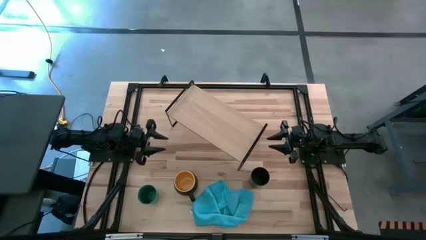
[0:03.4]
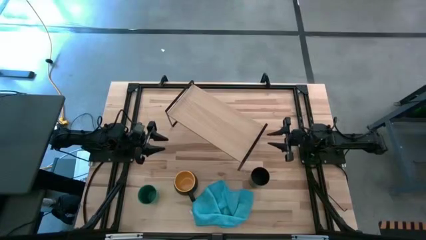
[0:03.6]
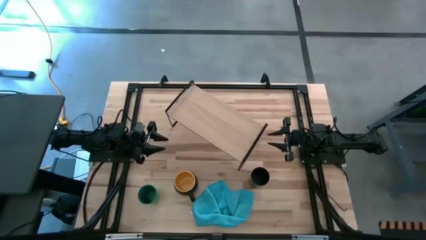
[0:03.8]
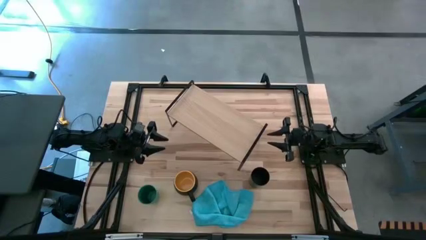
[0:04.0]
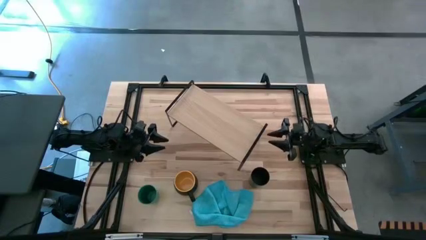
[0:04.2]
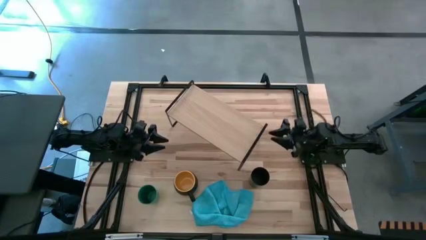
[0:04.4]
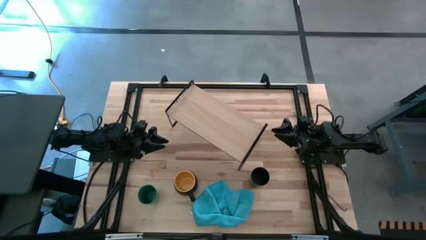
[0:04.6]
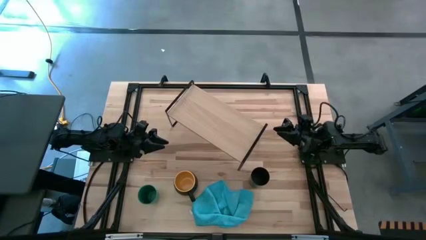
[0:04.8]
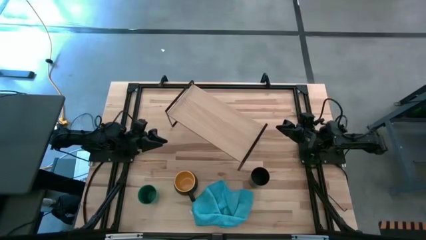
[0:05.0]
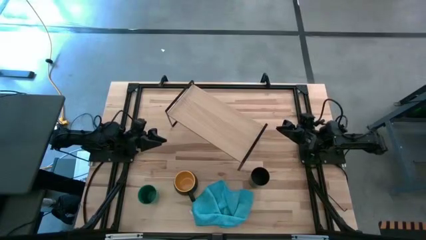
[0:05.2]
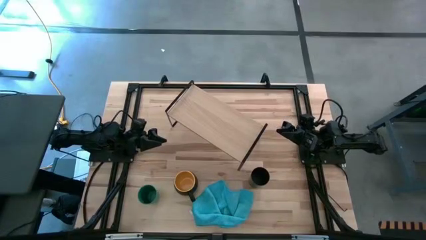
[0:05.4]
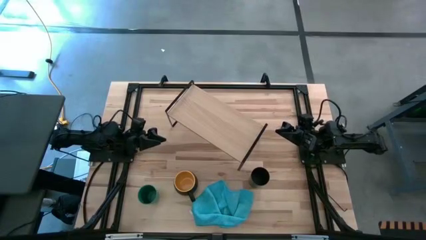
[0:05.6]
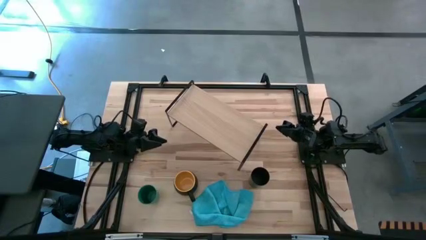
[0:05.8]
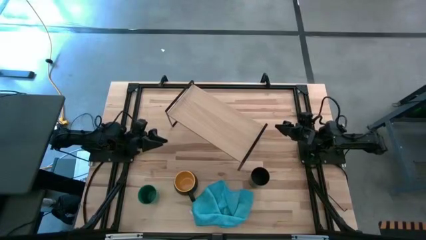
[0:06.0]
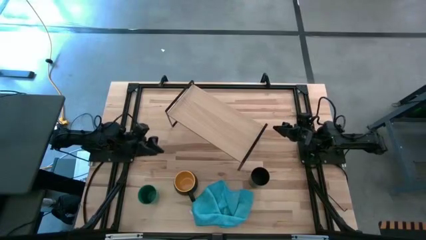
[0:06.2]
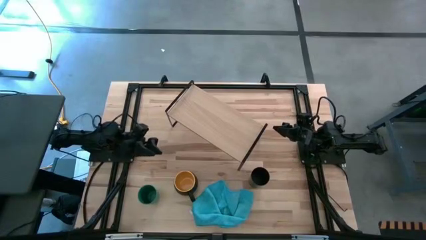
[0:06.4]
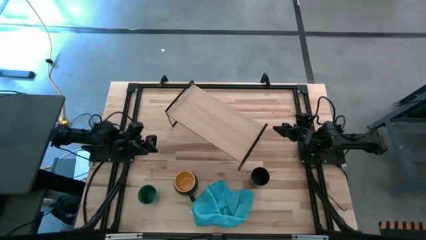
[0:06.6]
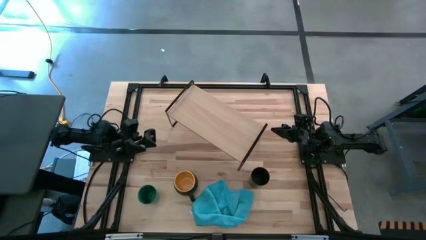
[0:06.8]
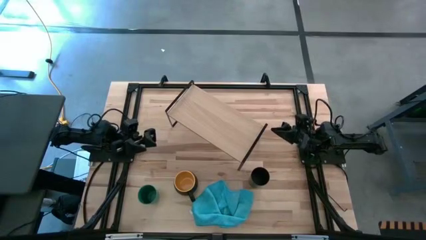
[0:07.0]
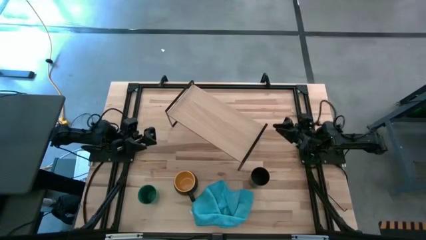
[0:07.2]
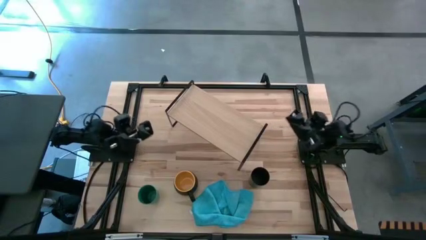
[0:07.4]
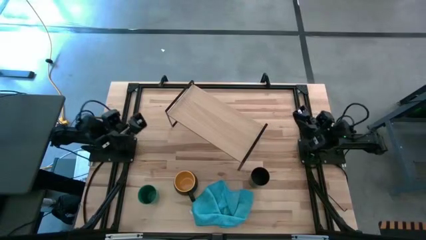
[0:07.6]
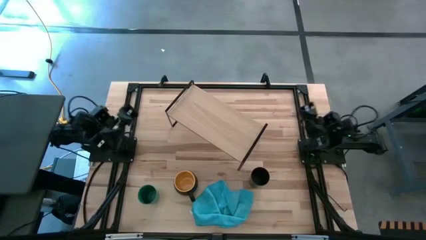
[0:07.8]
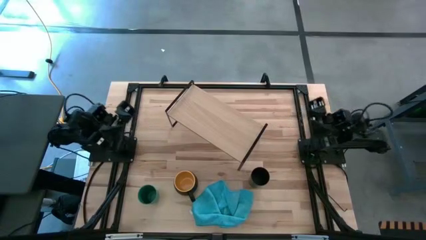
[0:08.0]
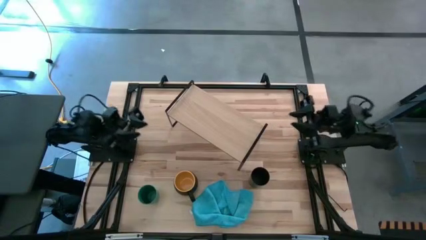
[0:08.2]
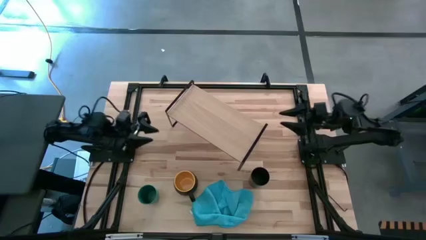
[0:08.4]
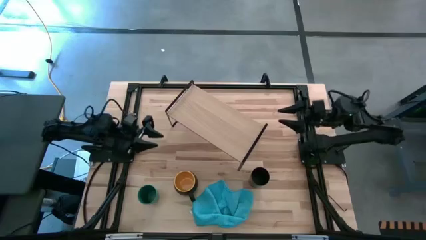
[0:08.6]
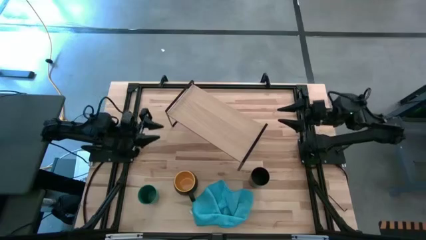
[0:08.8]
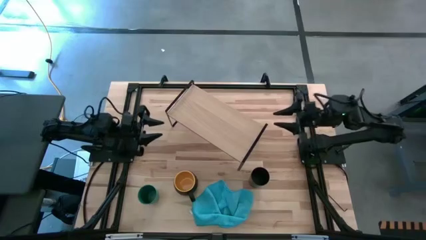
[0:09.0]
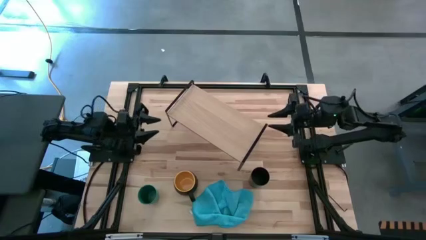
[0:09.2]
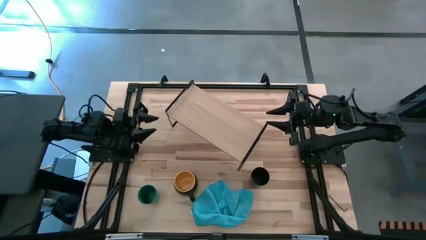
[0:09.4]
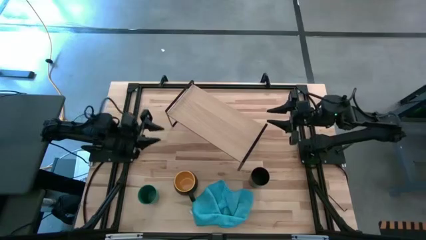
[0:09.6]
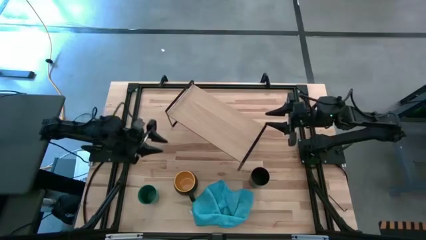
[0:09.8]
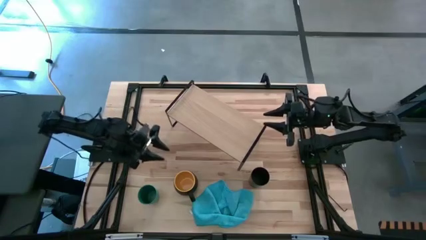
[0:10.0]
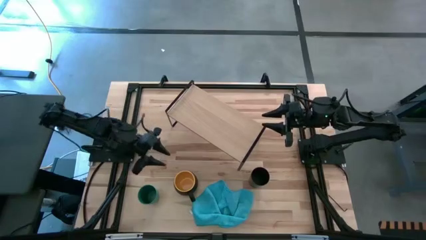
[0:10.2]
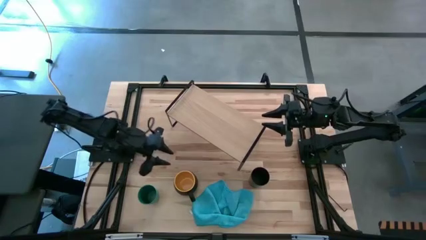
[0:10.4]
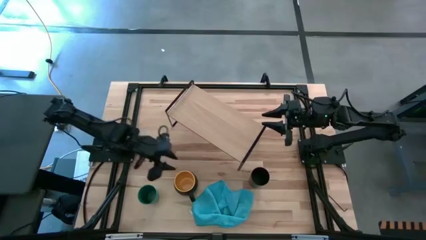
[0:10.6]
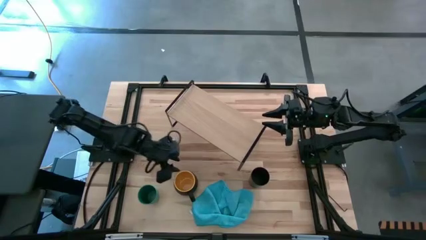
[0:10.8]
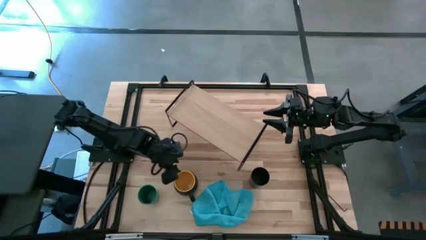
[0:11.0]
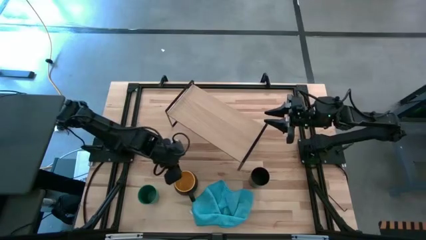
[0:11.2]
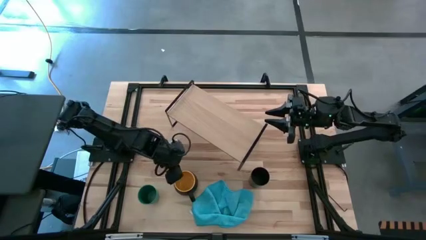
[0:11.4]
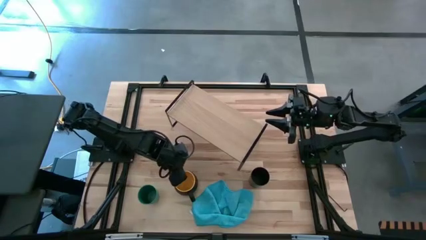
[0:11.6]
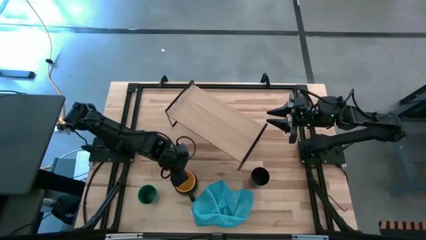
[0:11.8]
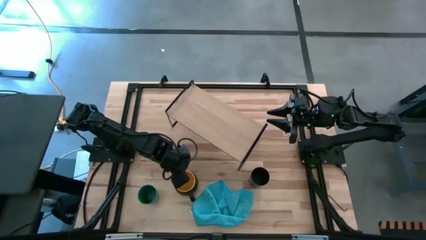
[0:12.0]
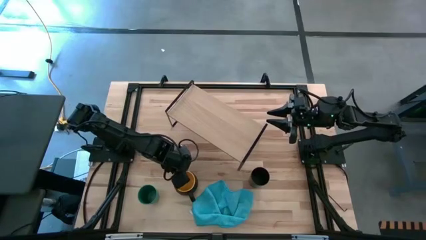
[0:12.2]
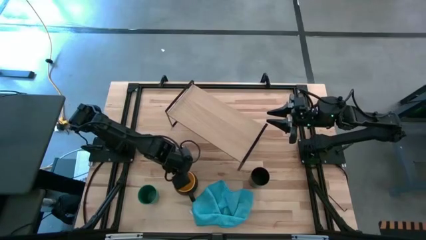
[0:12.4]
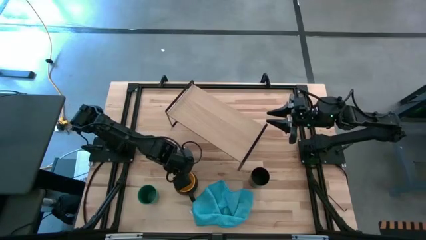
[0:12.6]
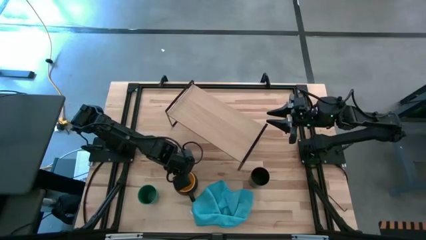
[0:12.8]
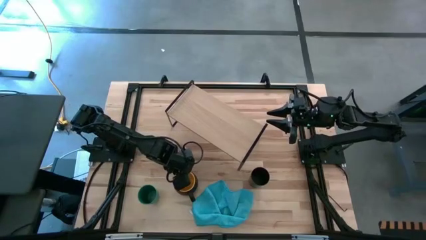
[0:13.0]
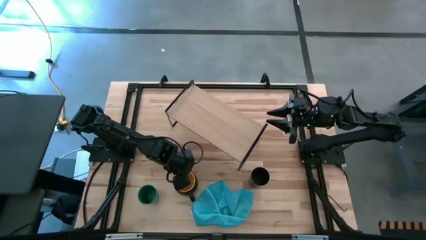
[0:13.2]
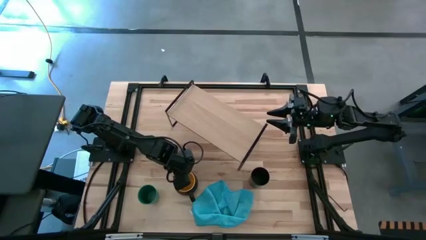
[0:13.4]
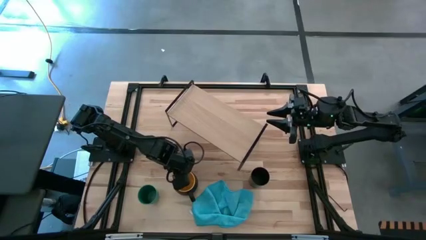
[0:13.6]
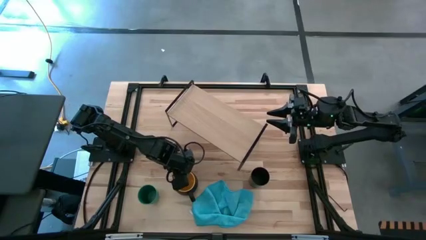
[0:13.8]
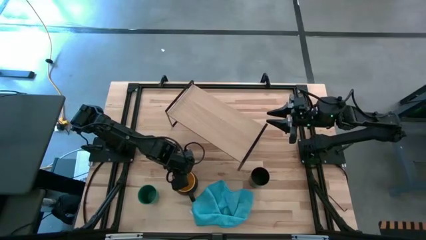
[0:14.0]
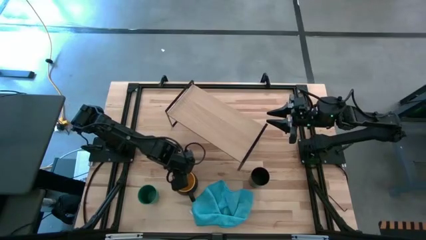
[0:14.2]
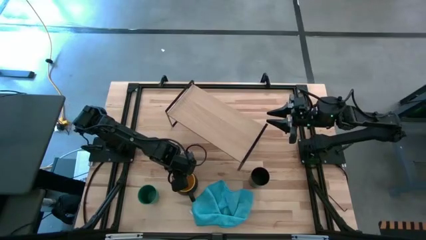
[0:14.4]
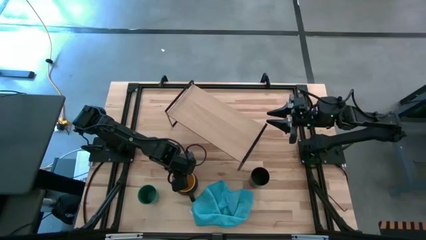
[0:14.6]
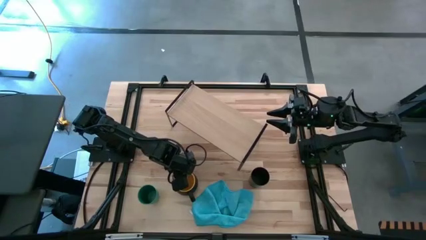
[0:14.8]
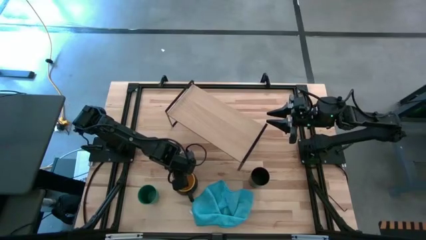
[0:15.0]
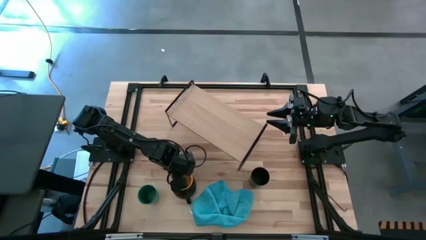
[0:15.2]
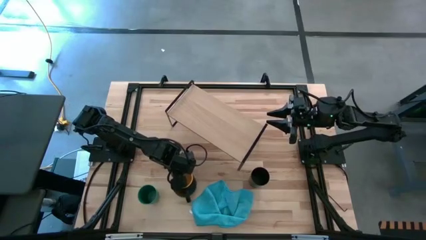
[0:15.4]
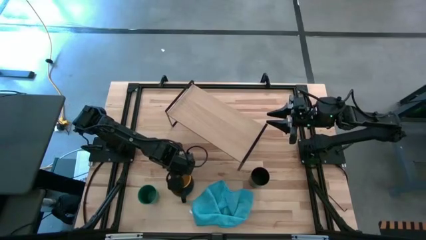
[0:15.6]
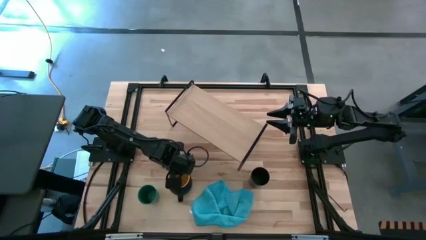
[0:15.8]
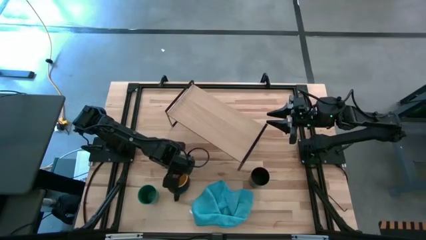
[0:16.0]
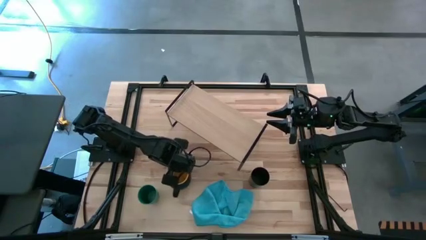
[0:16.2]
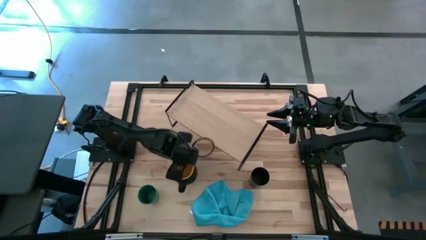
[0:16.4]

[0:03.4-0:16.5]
Task: Stack small to large cups/mugs on shelf
Put the black mug on the shelf
